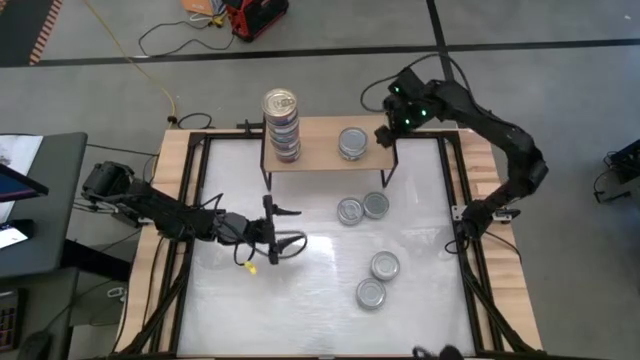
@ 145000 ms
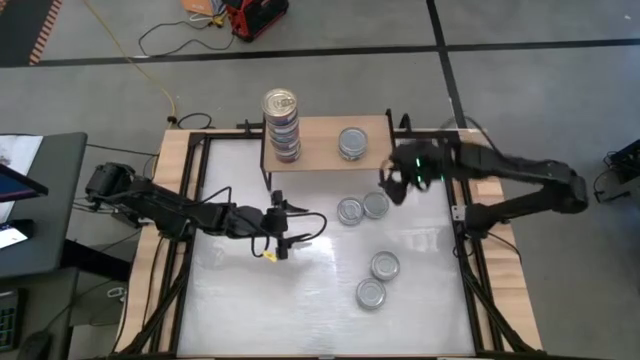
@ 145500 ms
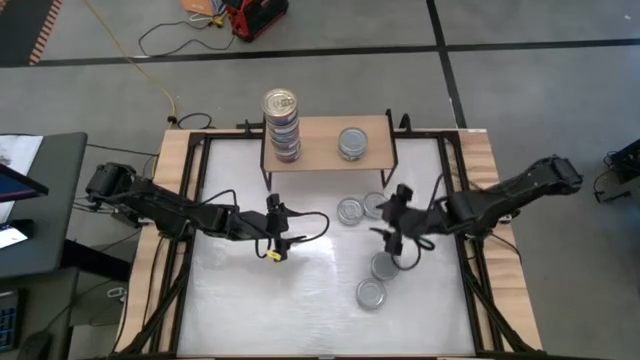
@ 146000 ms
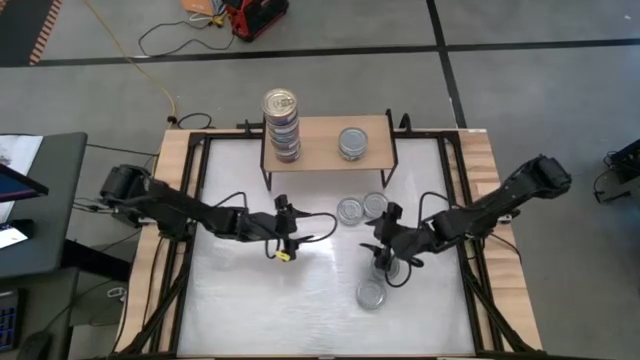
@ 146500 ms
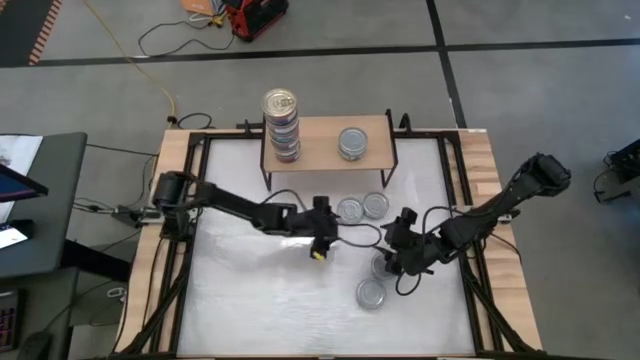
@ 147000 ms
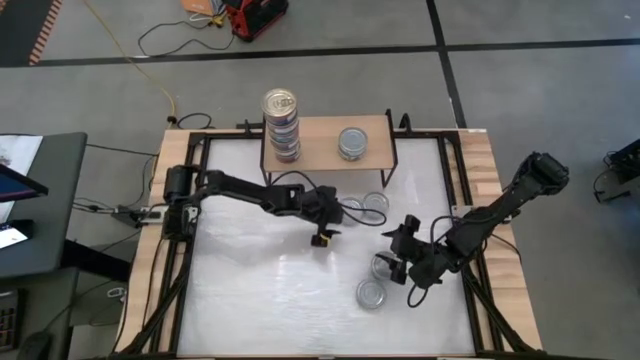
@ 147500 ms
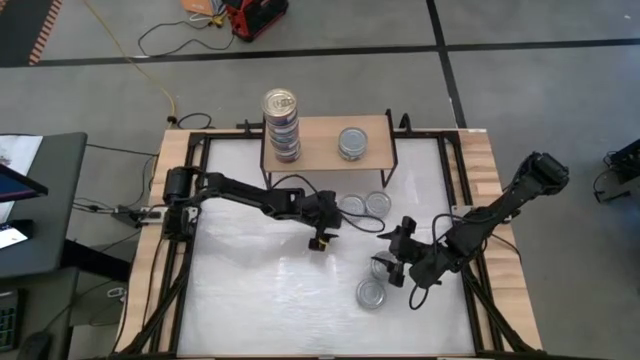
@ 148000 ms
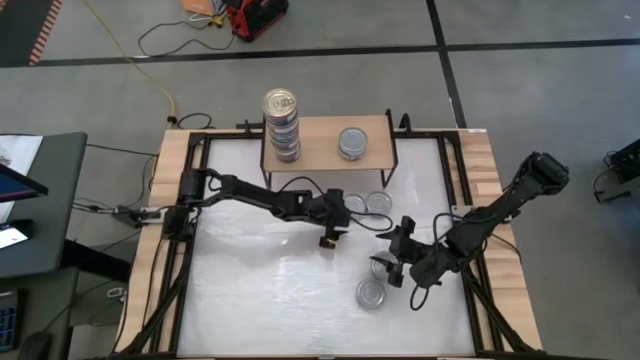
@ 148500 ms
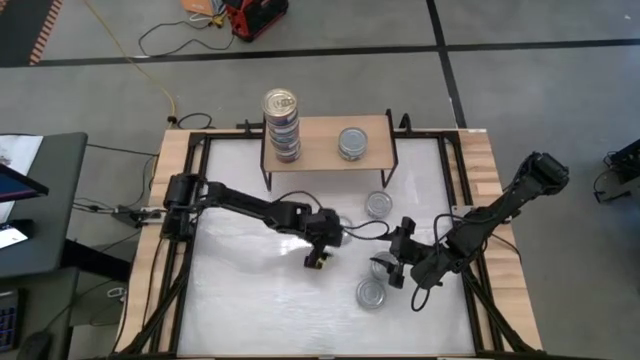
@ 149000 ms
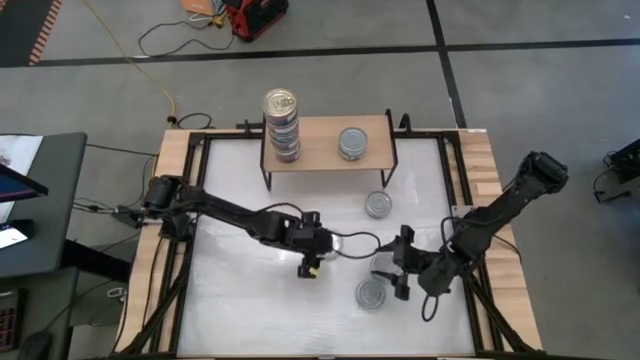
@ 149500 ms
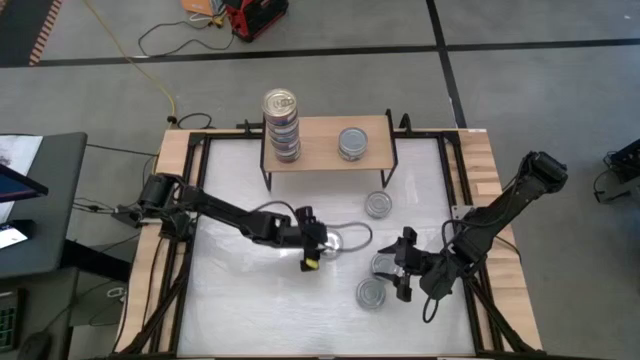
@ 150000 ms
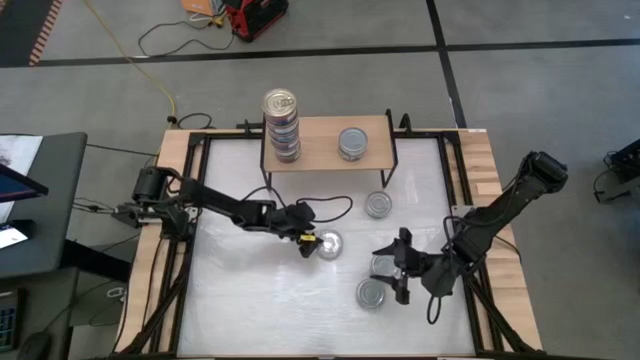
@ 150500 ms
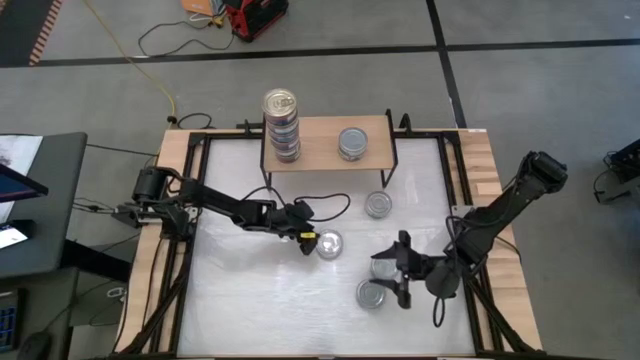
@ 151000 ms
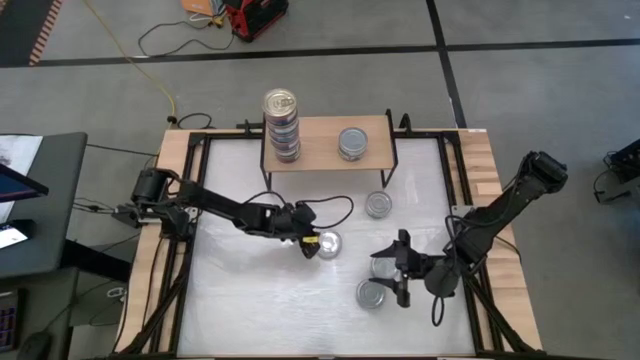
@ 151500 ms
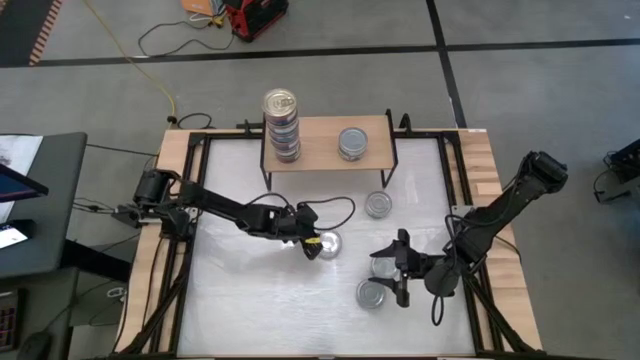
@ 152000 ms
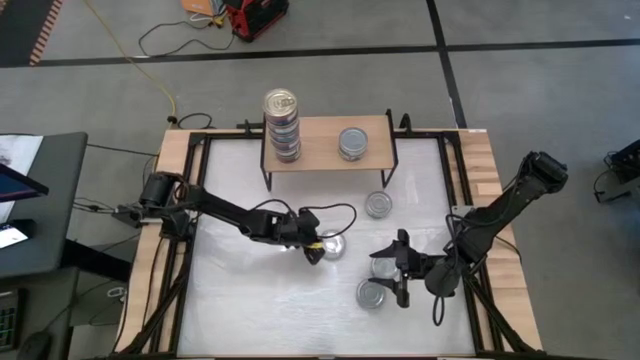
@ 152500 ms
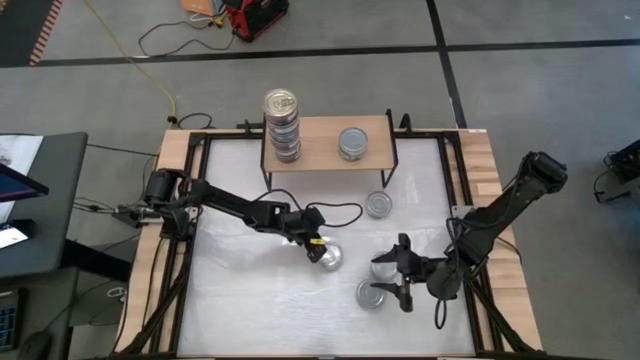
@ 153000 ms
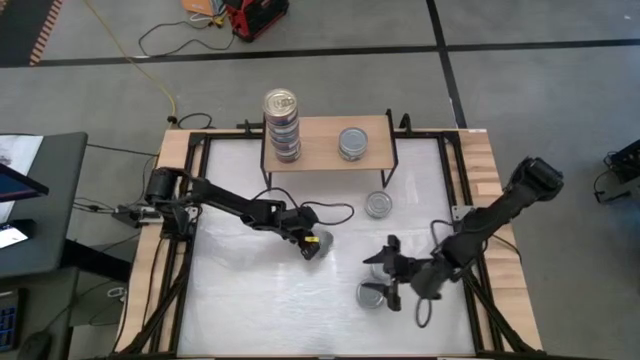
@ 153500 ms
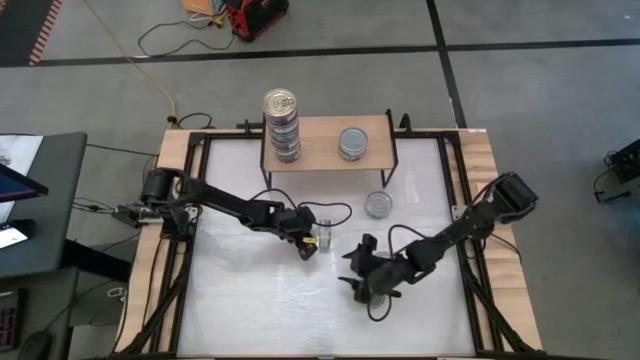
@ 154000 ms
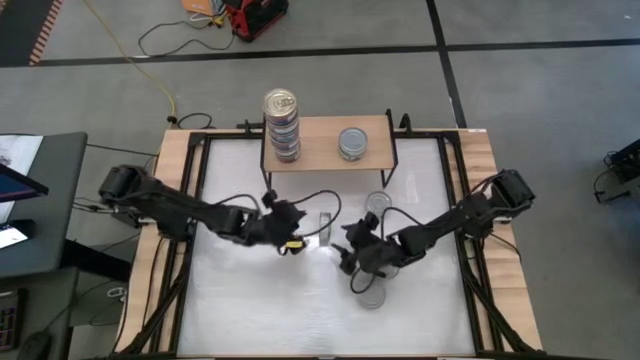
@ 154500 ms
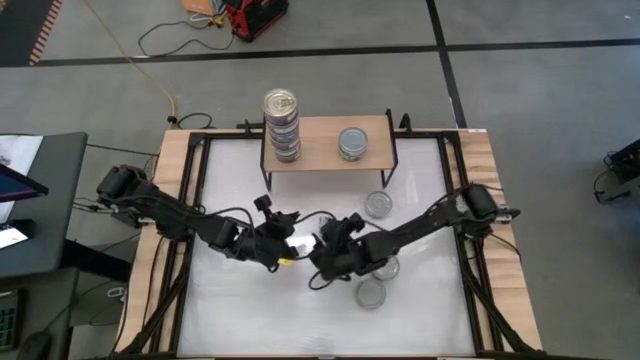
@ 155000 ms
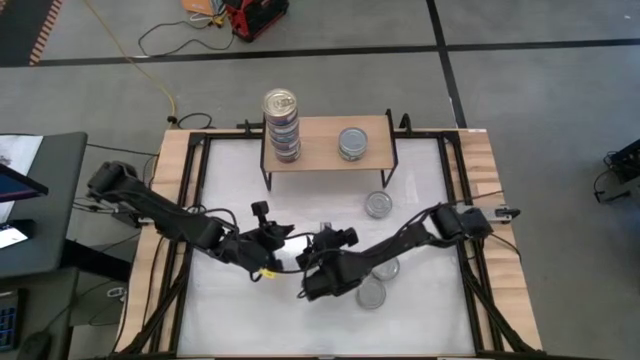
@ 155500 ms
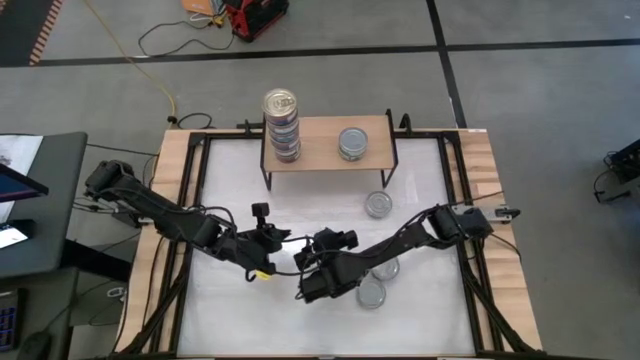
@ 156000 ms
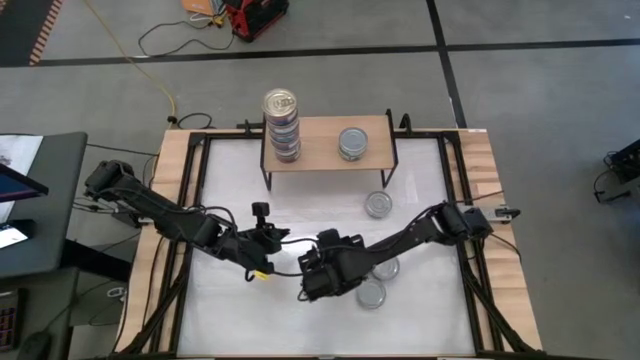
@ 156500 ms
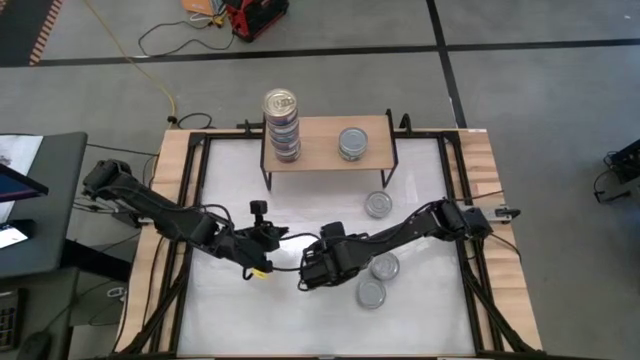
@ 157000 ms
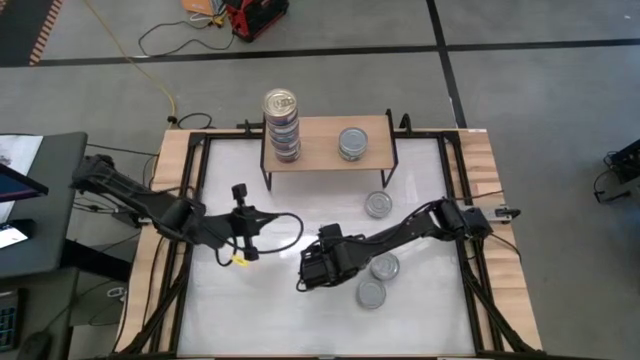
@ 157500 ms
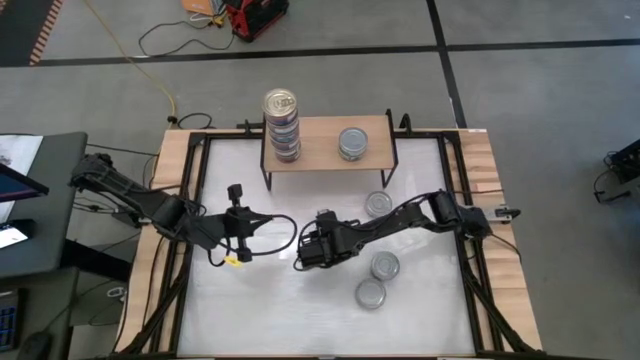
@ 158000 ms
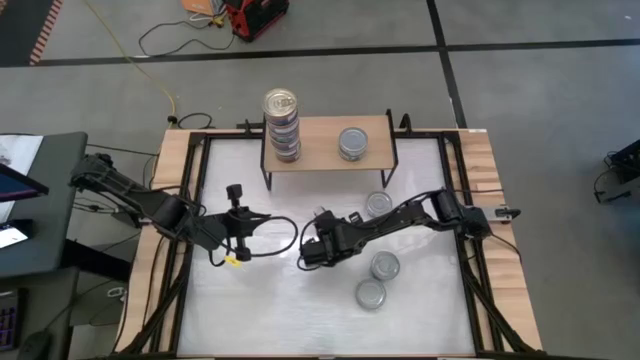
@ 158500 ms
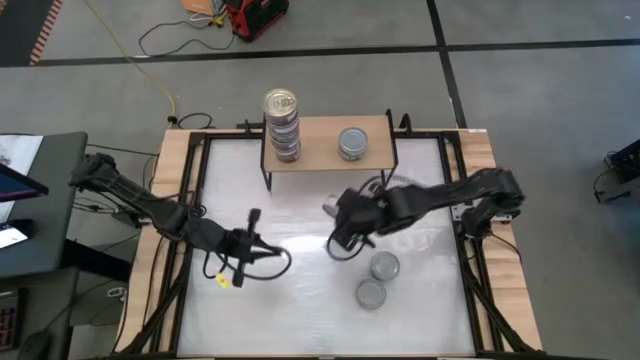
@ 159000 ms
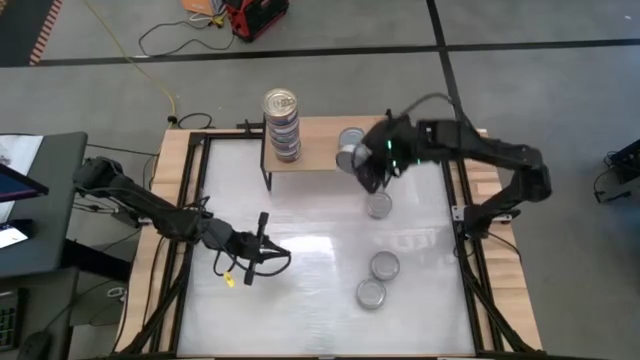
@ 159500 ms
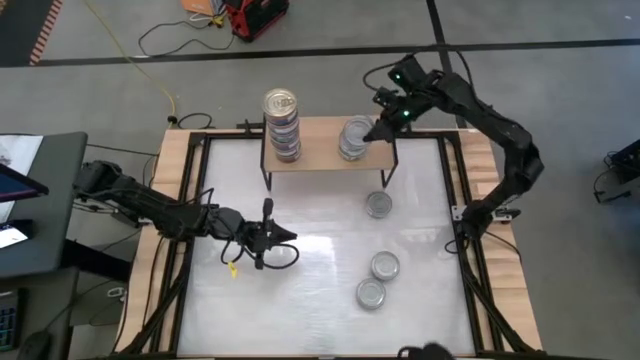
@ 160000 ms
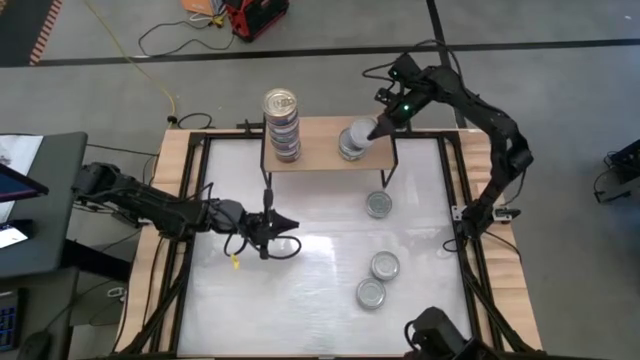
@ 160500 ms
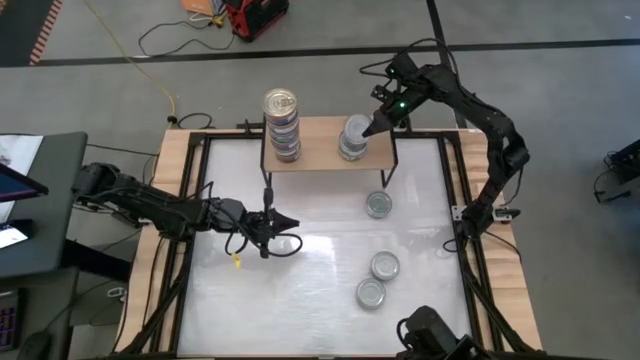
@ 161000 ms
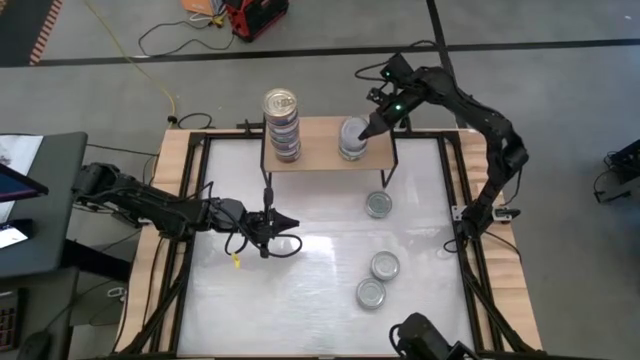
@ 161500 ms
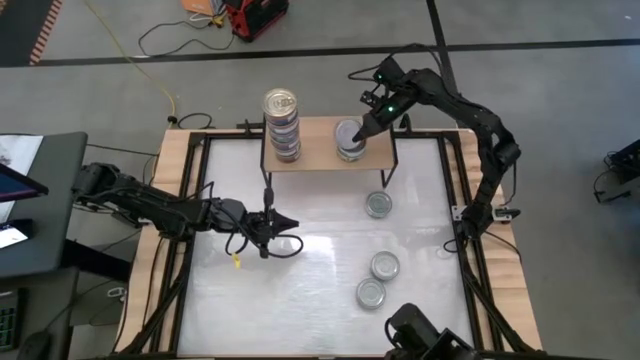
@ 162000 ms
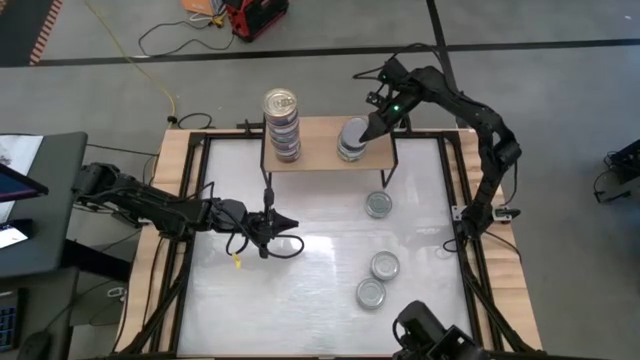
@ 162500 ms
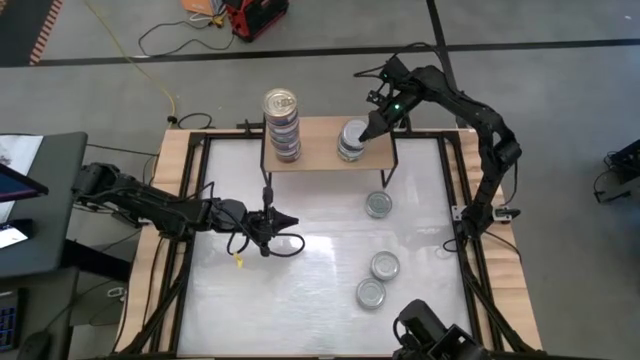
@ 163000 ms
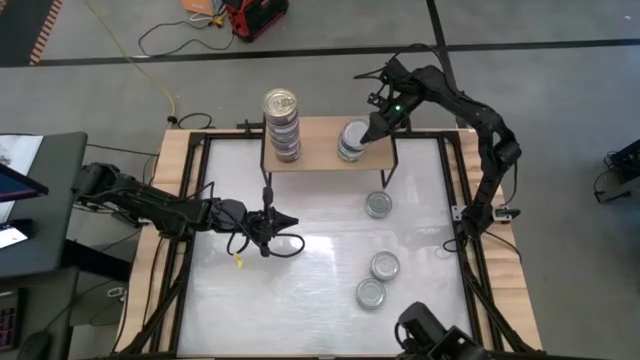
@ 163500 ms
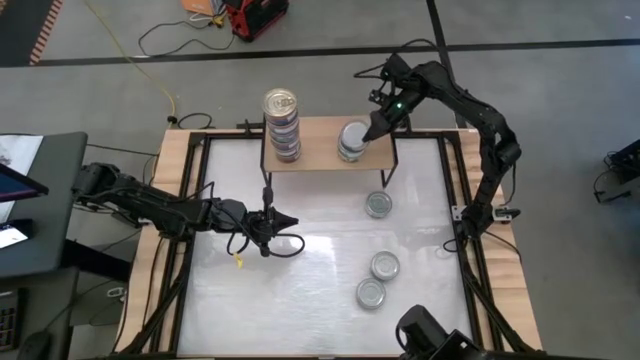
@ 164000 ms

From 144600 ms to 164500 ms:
Task: Stack canned seafood by type on shelf
Stack the green tuna can on top of the green tuna can

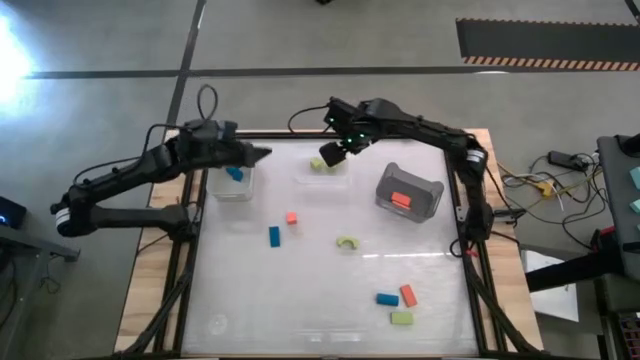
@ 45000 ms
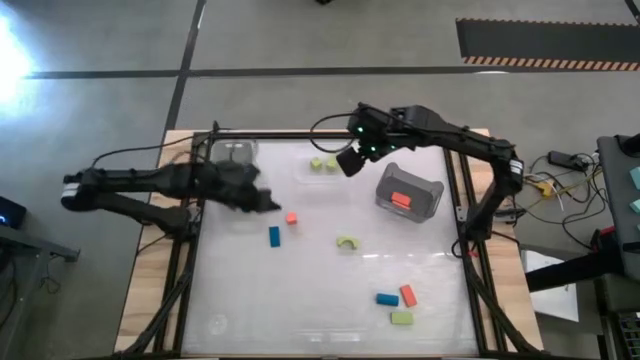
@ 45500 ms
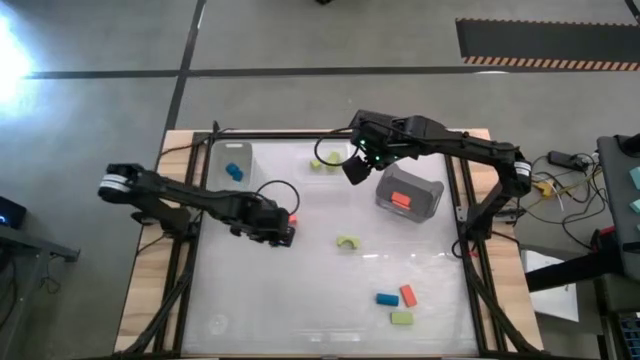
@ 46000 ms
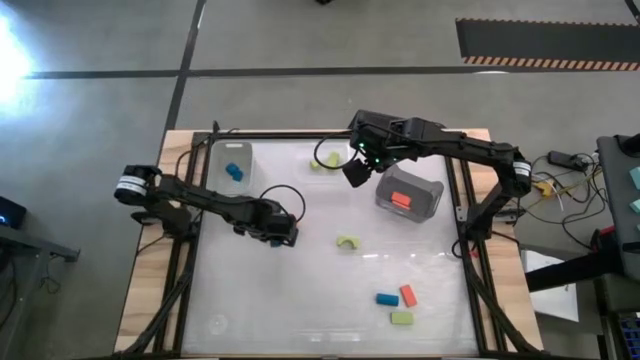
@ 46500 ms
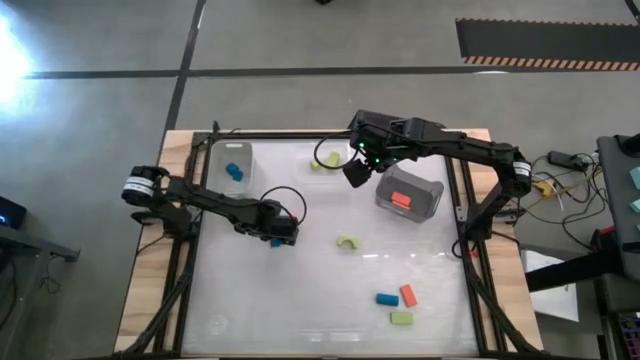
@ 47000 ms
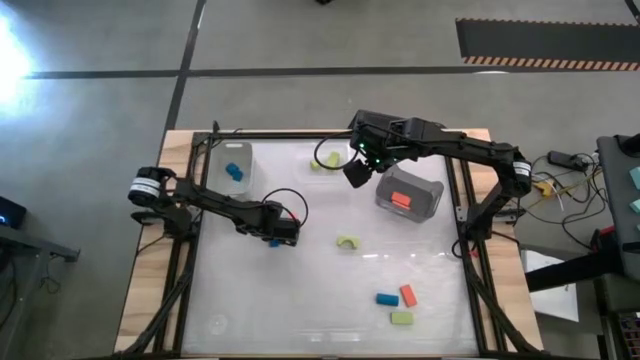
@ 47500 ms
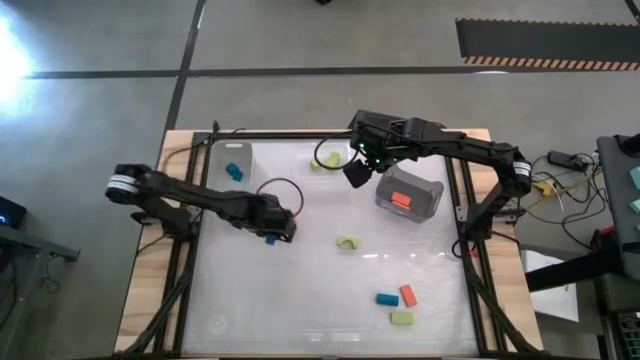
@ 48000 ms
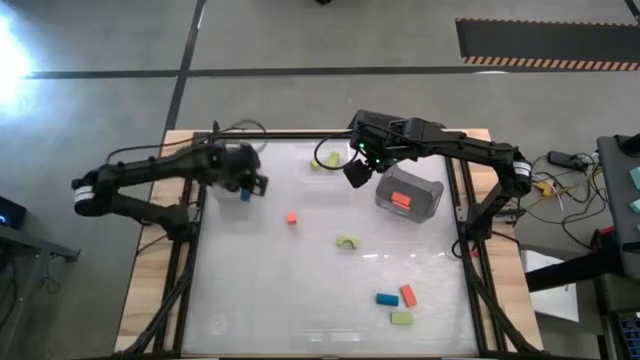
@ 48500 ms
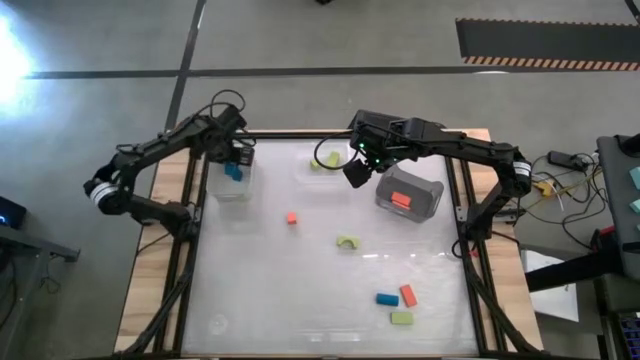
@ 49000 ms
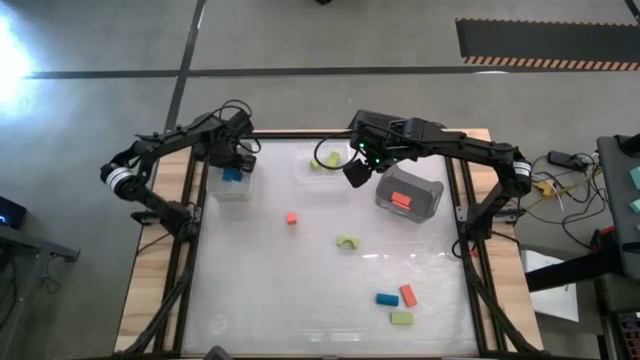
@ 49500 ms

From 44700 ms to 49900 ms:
Task: Sort & place blocks by color
Put the blue block into the gray bin
